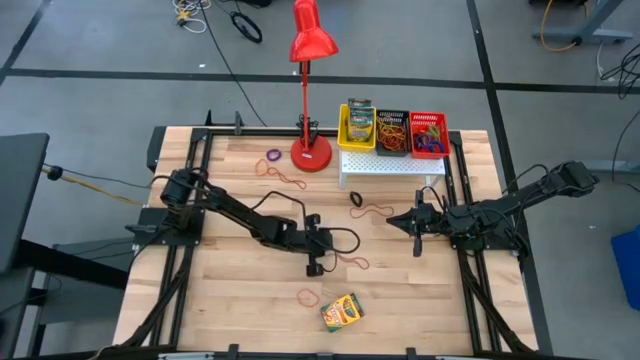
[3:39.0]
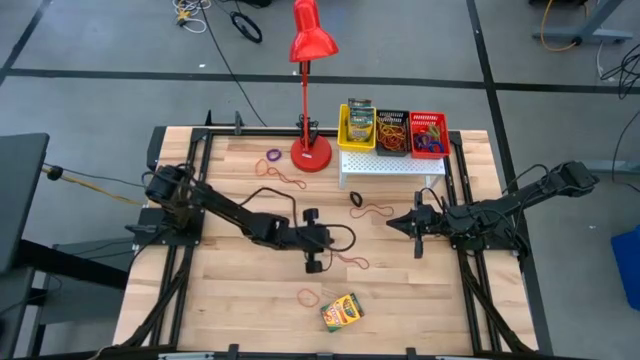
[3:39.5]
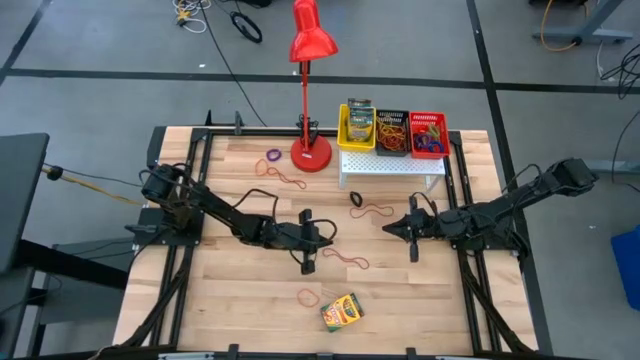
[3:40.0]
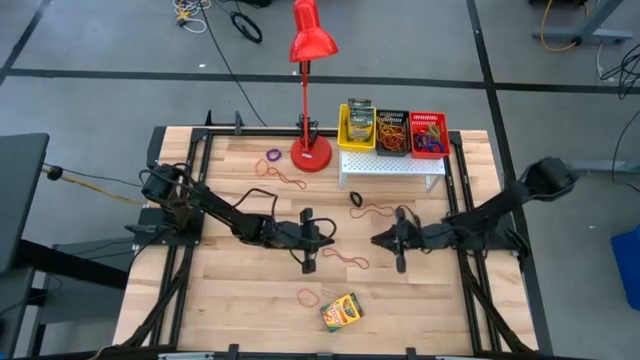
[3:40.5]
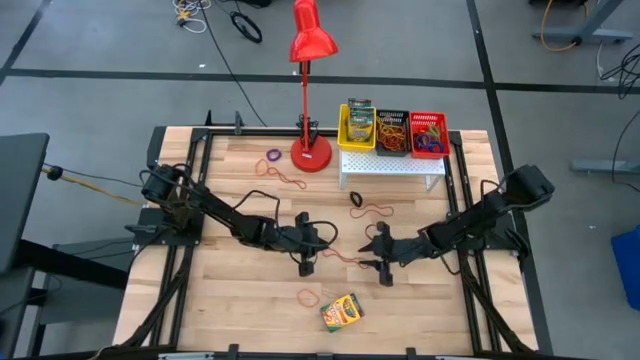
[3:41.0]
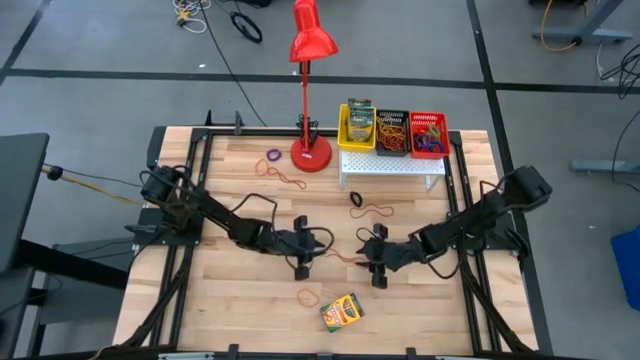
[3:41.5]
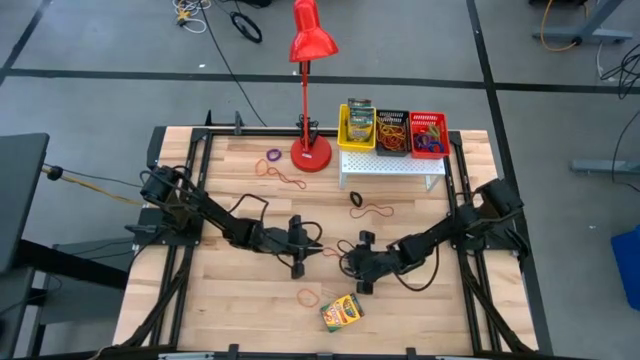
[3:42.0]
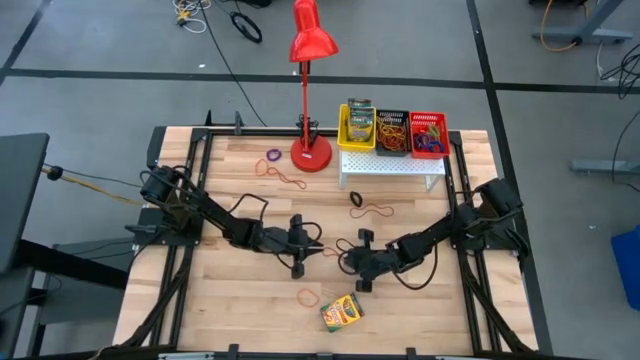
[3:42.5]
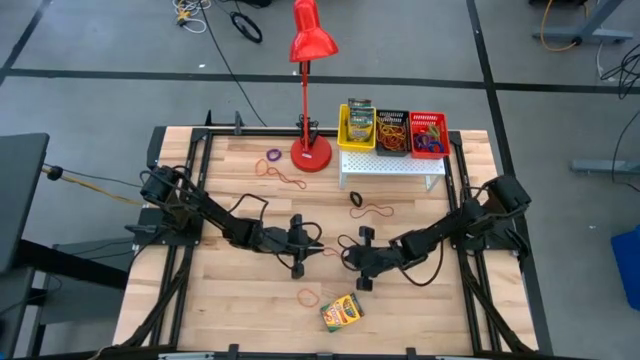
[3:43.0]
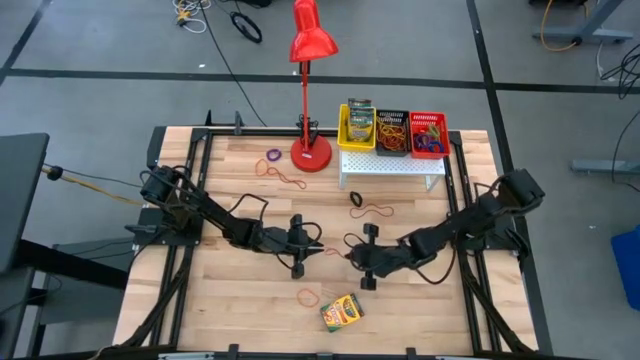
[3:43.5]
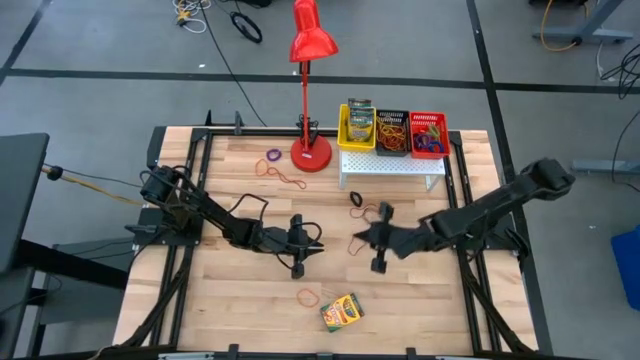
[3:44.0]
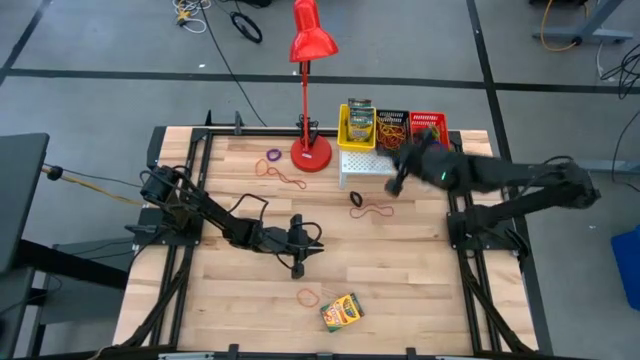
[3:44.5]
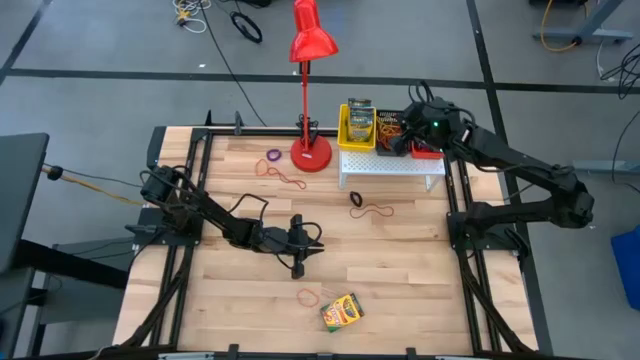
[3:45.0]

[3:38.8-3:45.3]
Task: Pick & Place Office Desk Supplies
Put the red rubber band into the black bin on the shelf

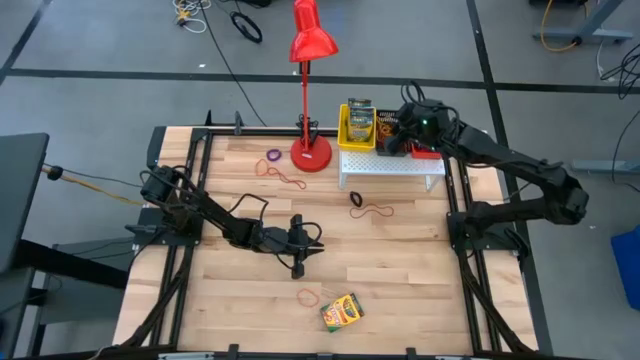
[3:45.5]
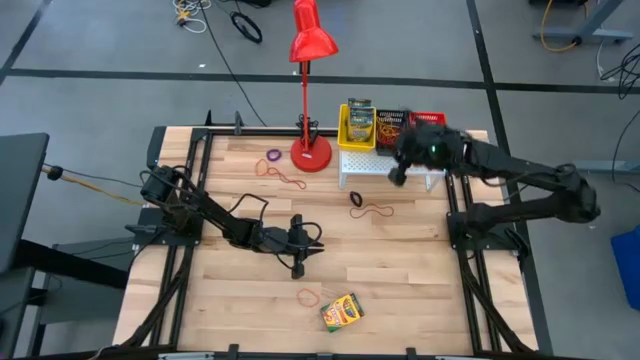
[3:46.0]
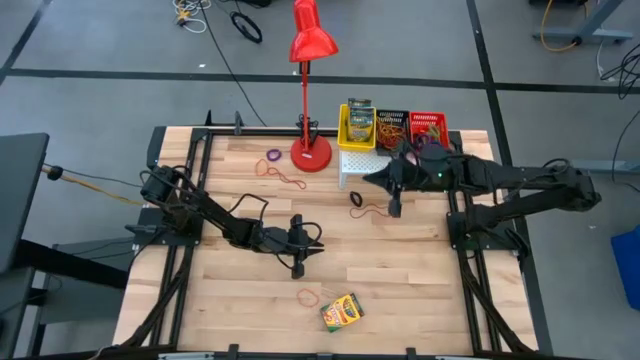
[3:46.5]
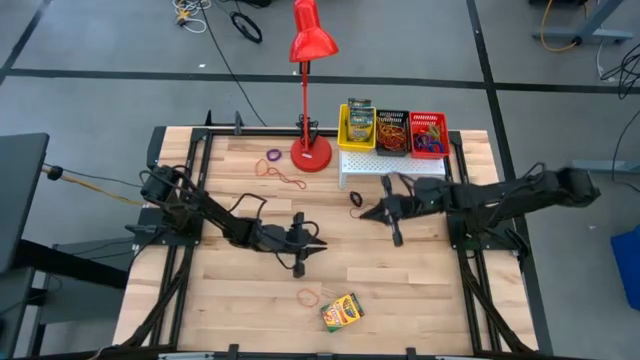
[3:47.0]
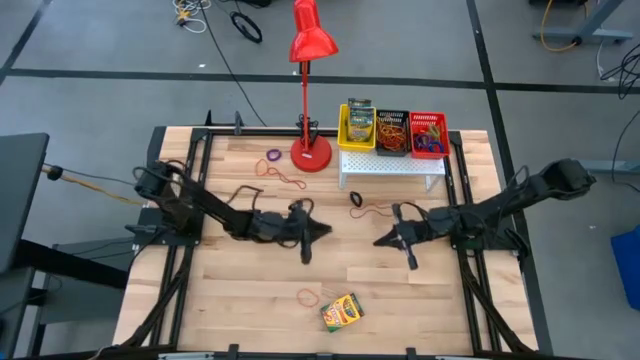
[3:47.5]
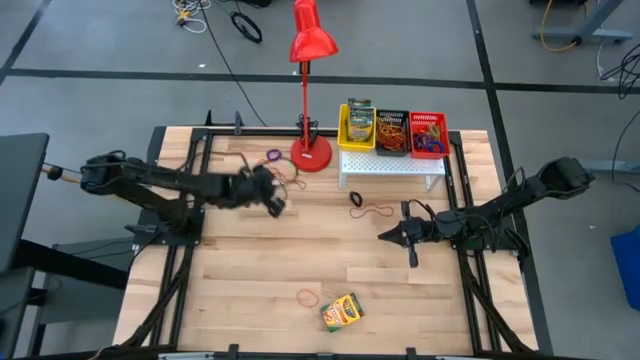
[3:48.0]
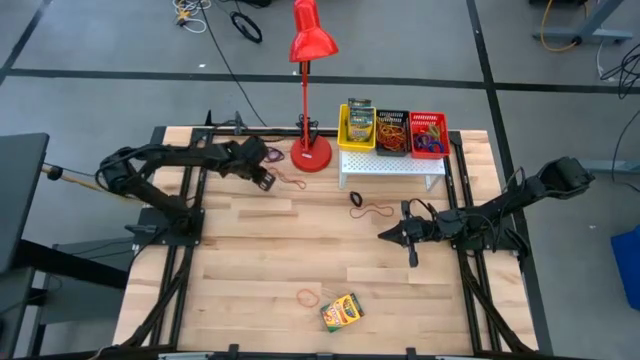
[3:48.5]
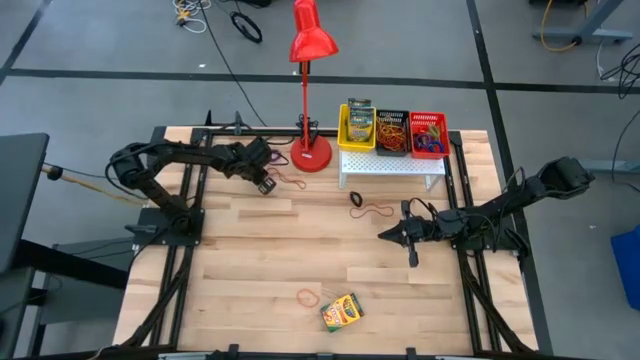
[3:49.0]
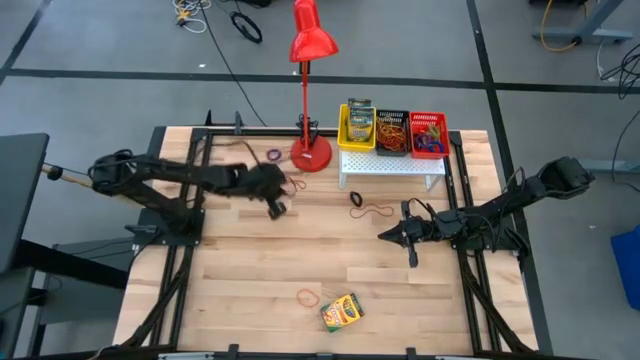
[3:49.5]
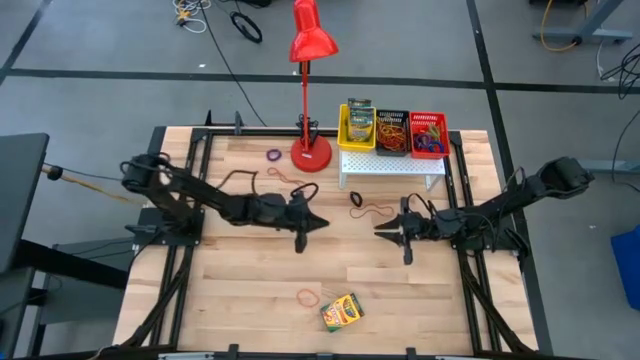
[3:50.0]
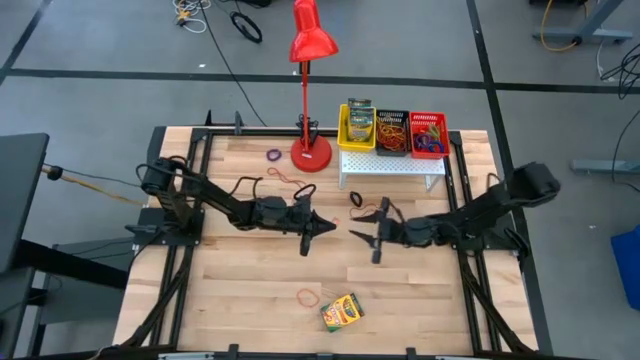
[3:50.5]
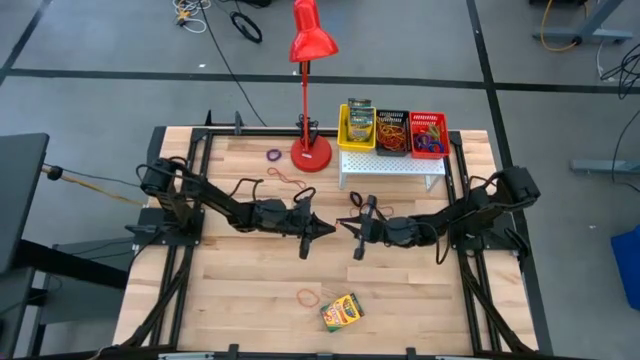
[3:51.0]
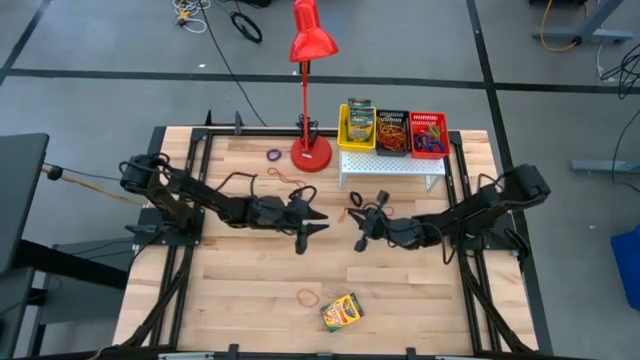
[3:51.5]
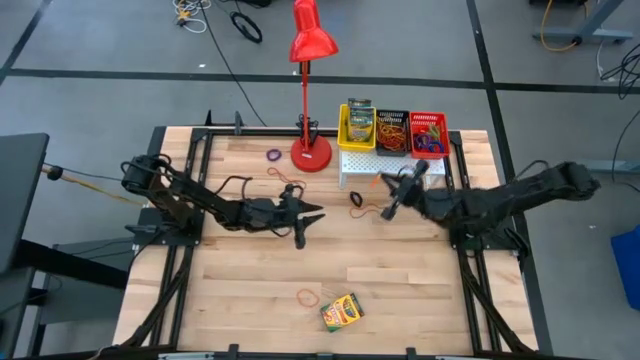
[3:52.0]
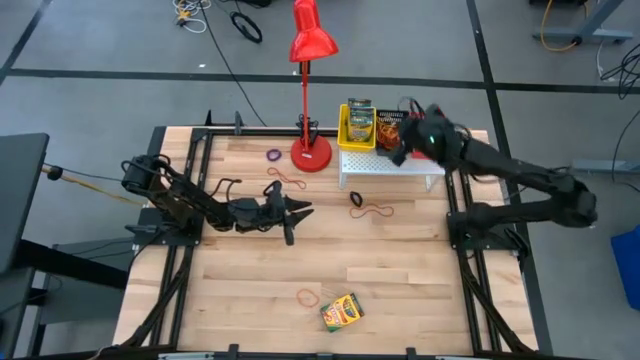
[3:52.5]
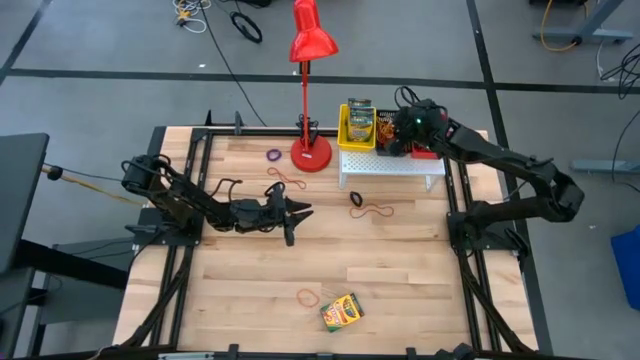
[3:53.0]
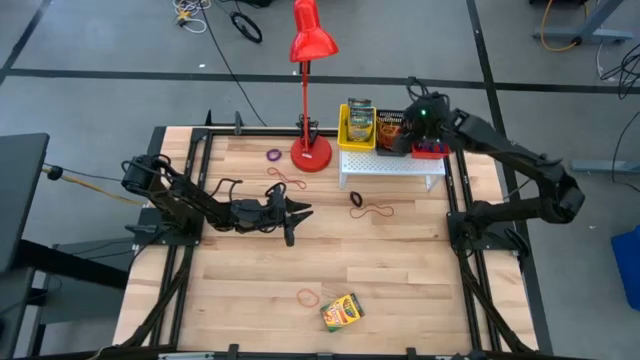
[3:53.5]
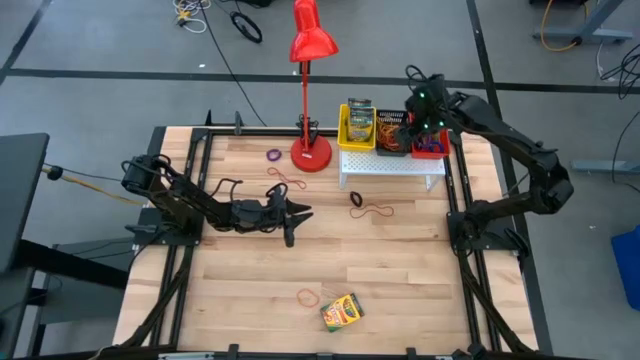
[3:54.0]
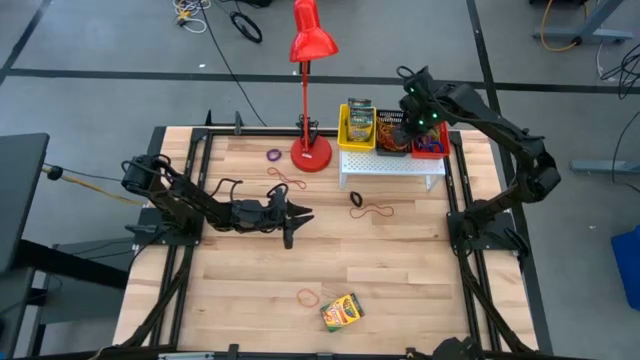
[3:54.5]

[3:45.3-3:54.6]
Put the orange rubber band into the black bin on the shelf

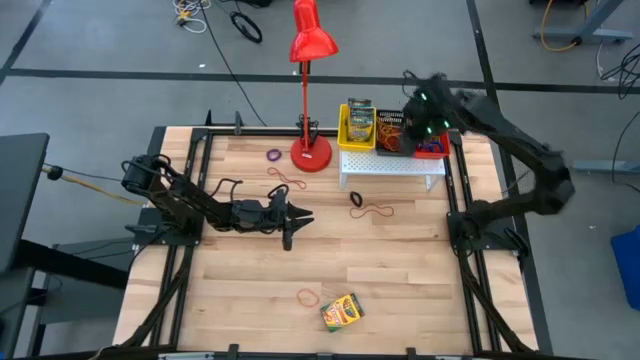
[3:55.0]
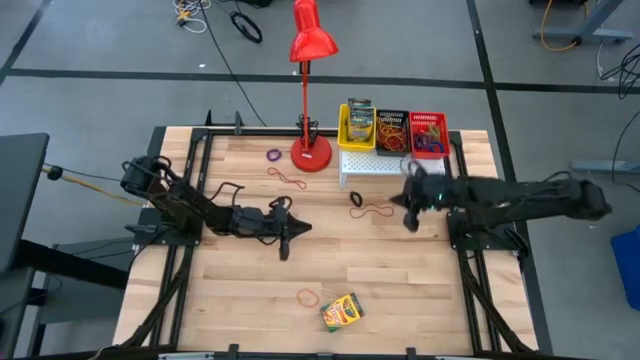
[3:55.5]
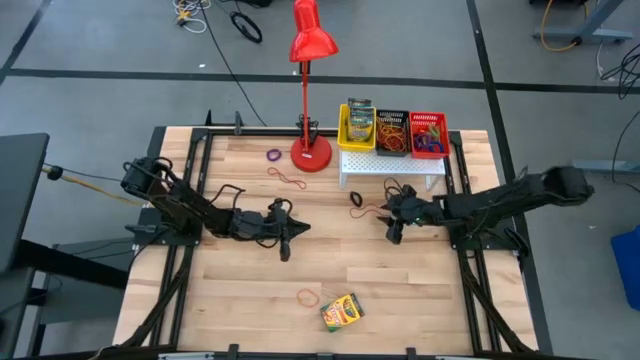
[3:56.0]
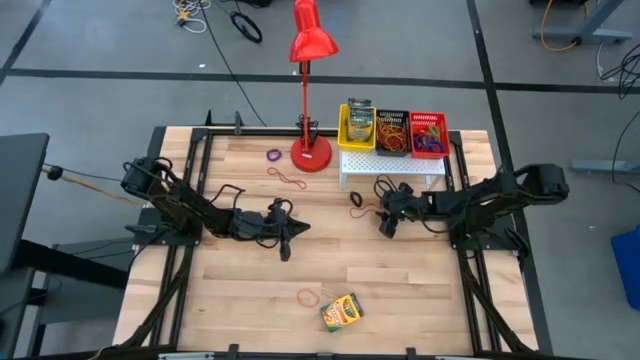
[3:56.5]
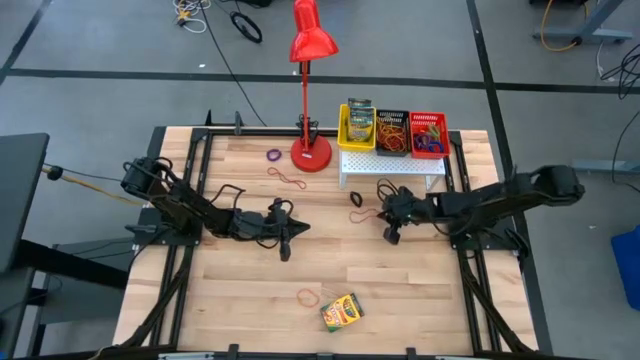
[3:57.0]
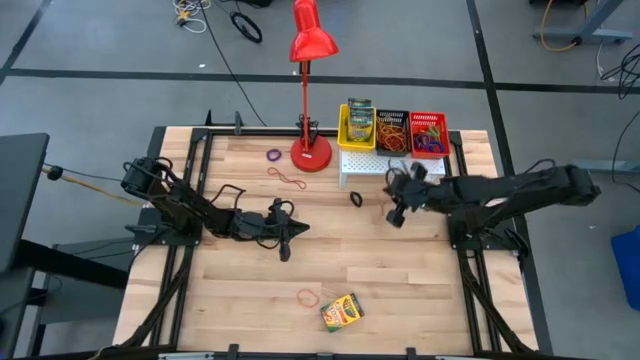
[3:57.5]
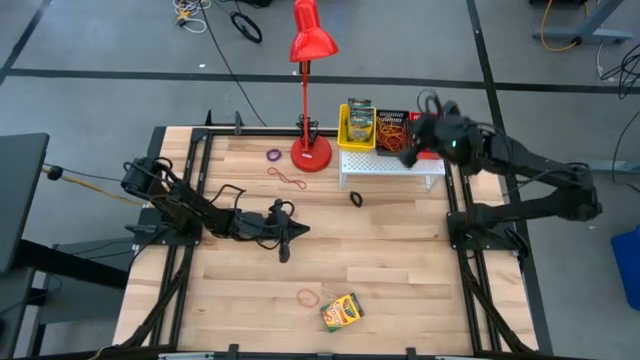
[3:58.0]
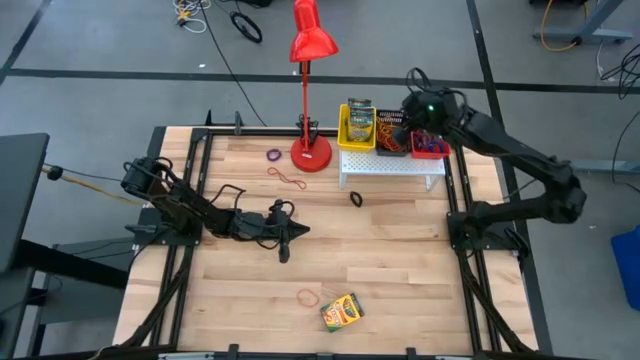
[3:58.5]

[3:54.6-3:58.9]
Put the red rubber band into the black bin on the shelf

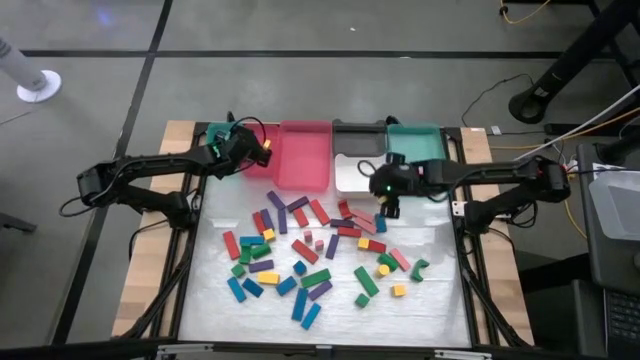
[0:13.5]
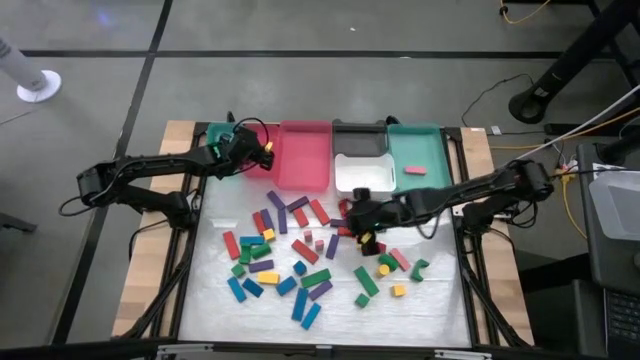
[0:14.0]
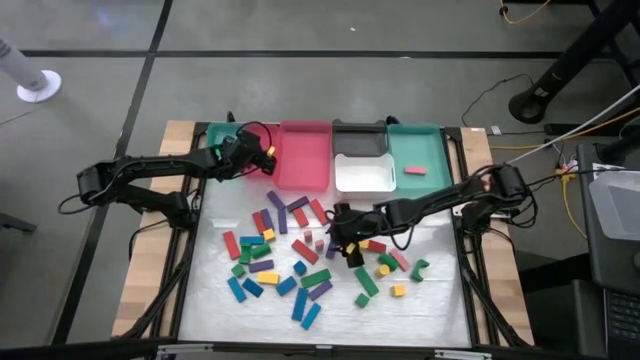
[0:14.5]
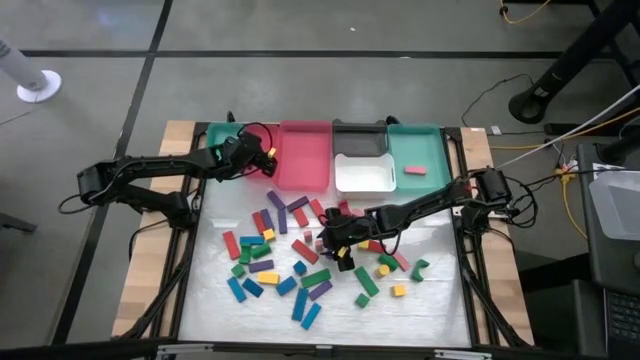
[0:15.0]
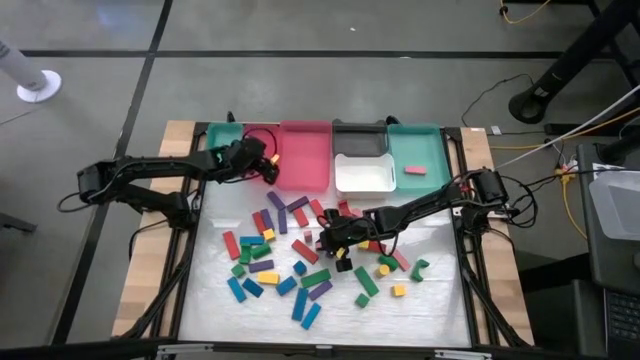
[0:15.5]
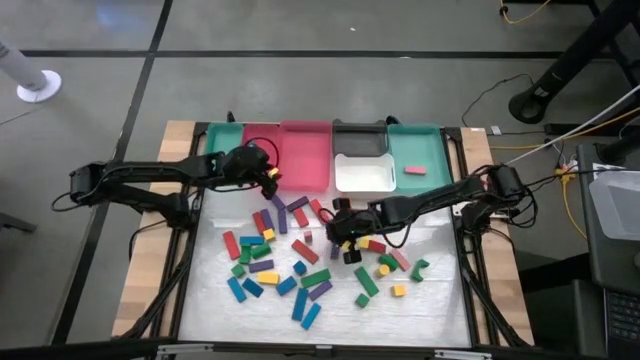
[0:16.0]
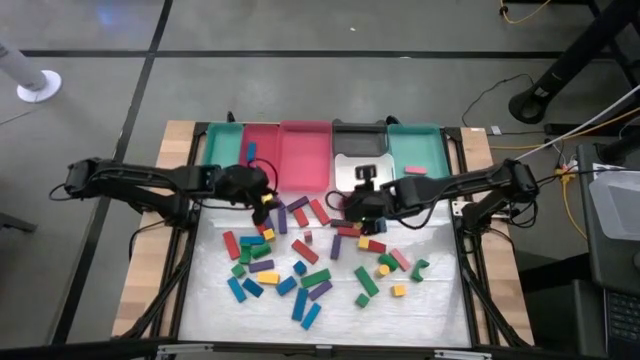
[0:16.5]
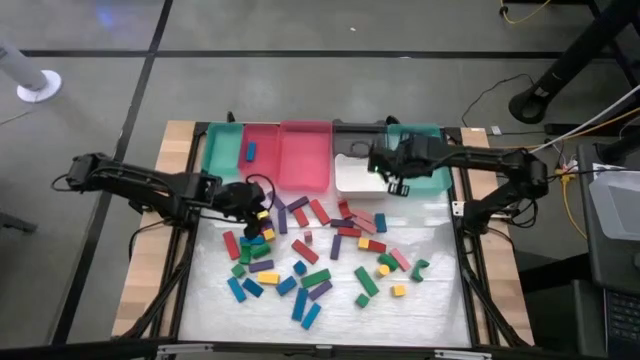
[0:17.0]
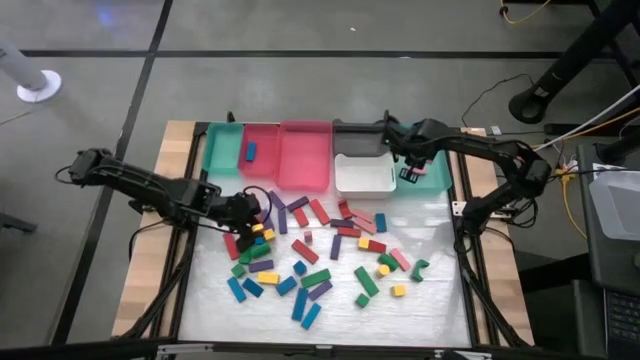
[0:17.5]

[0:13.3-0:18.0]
Task: Sort blocks
Put the pink block into the right green bin
